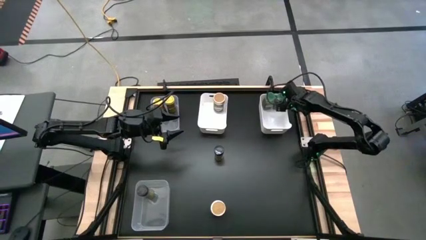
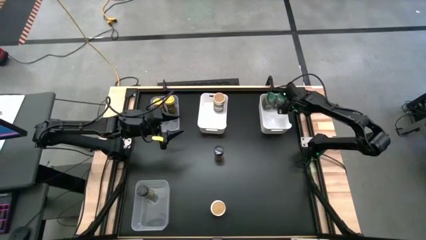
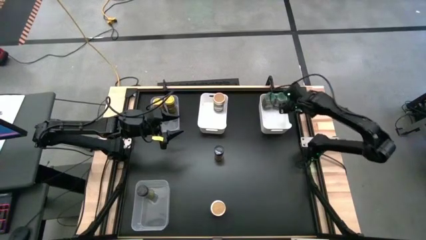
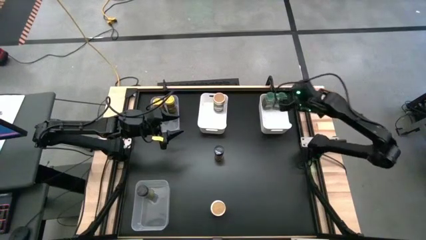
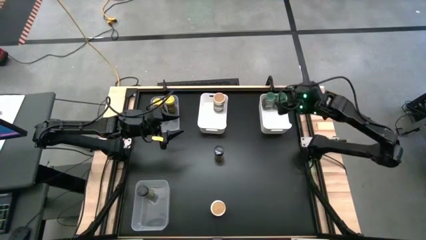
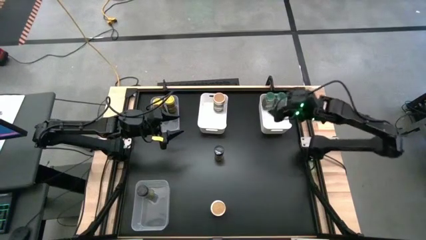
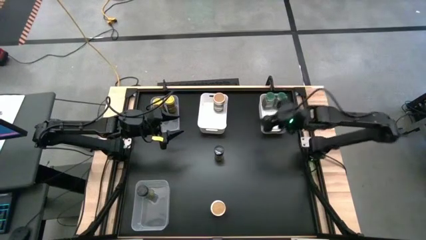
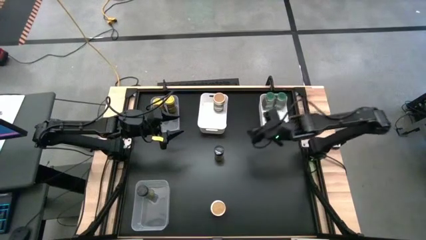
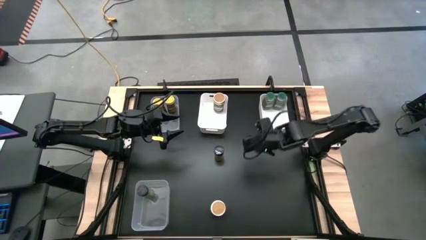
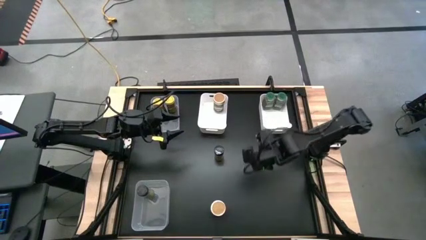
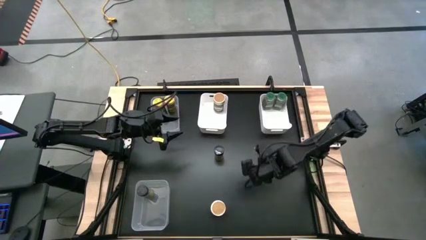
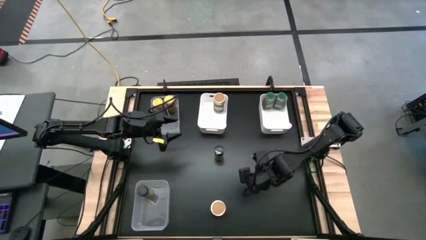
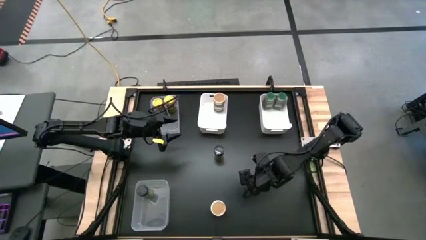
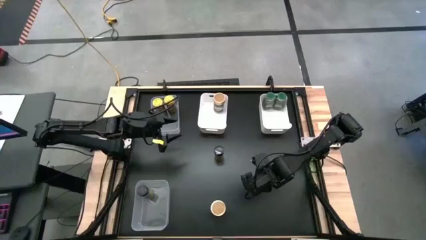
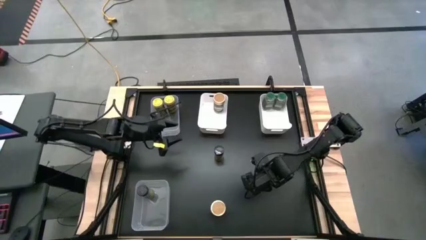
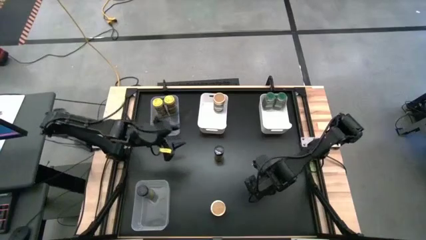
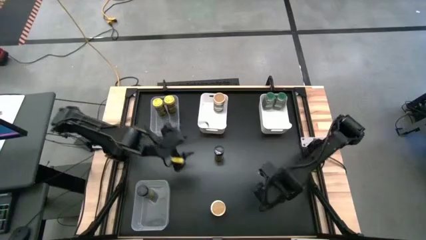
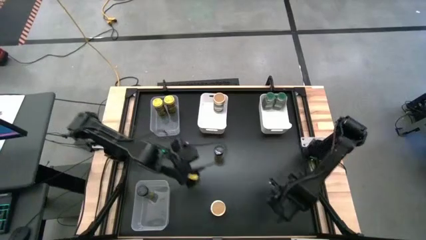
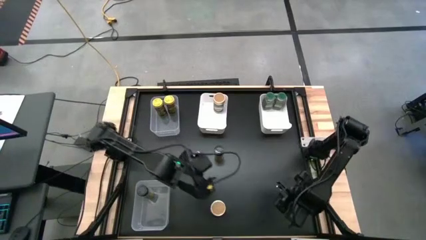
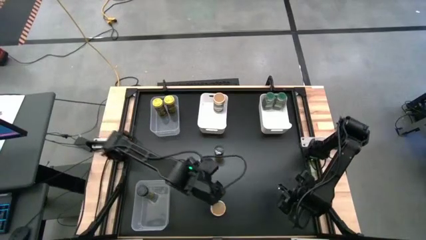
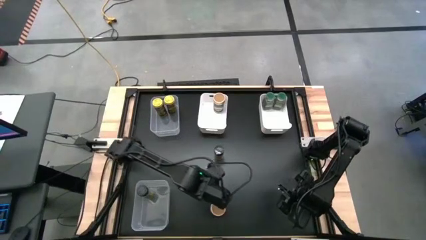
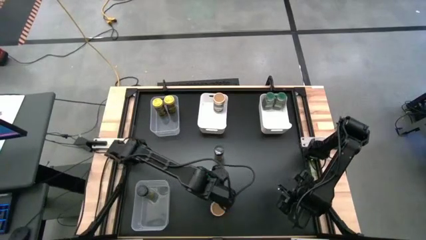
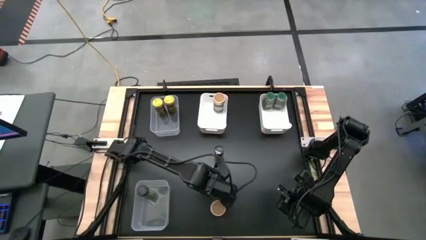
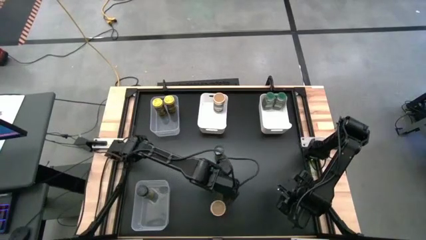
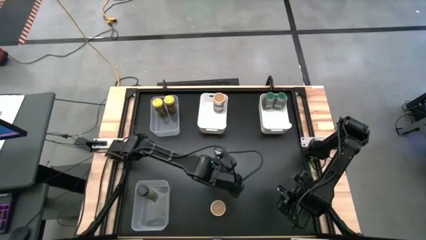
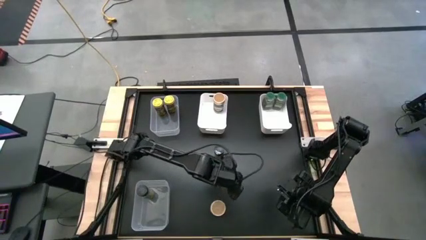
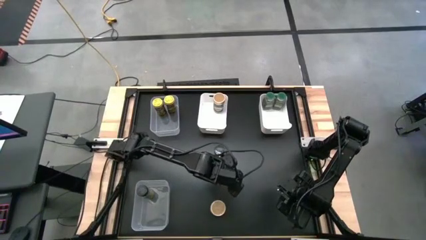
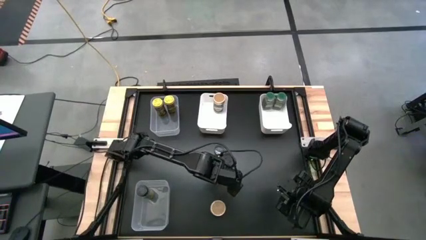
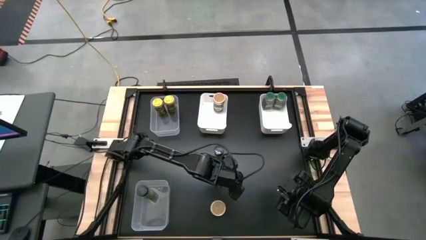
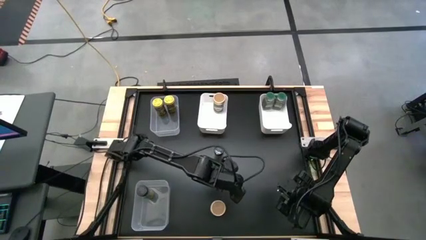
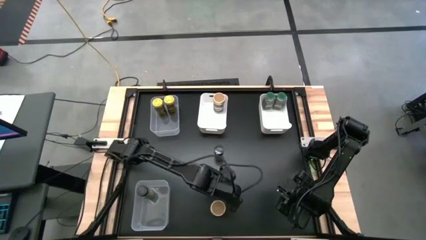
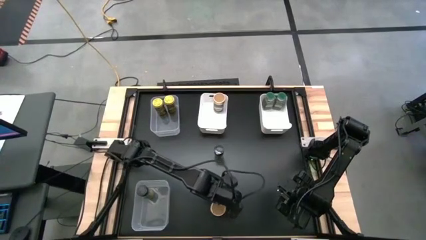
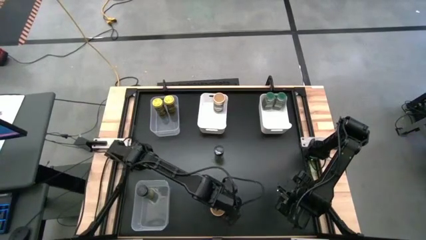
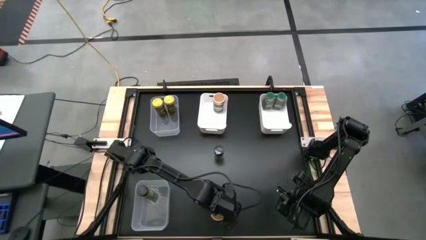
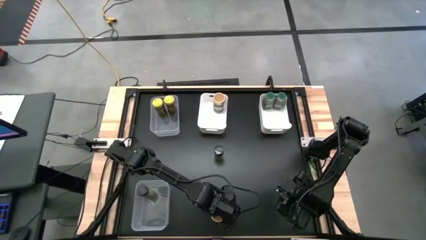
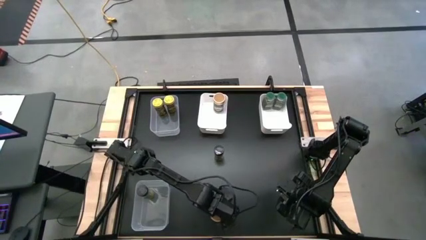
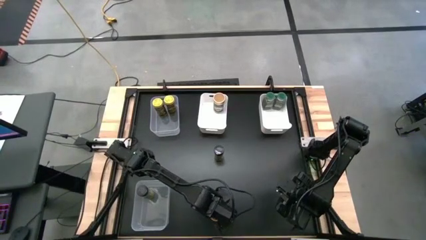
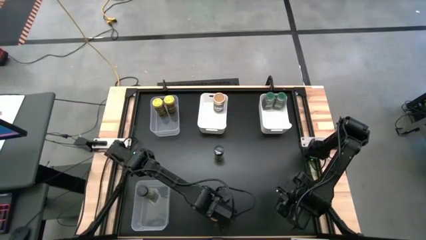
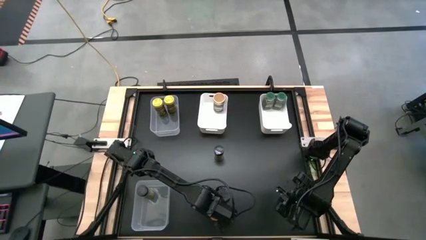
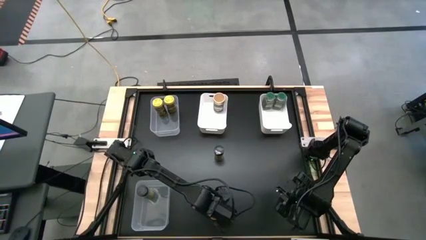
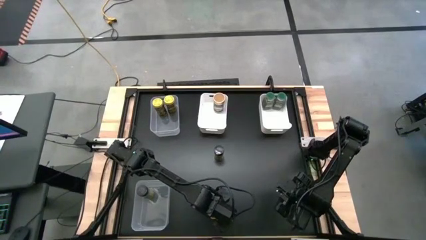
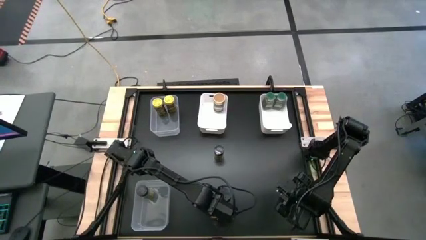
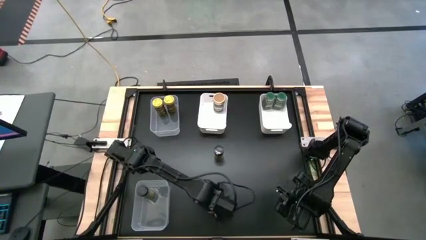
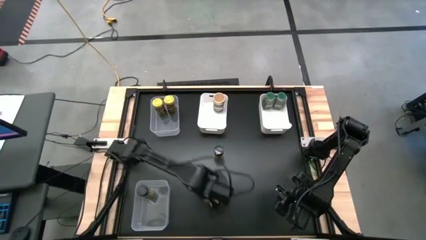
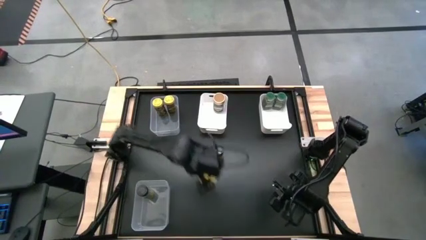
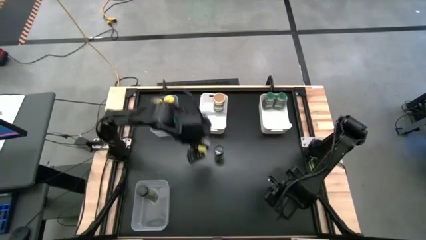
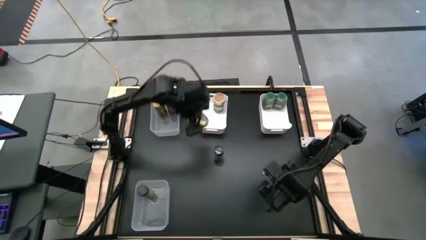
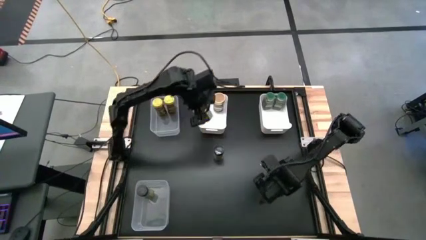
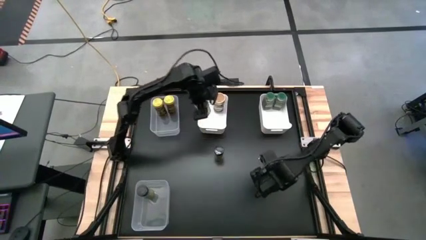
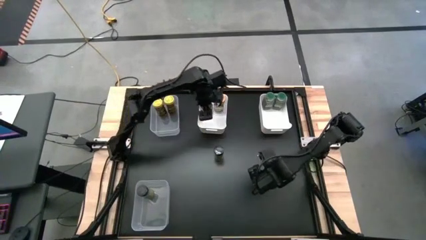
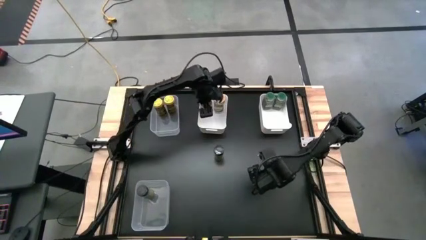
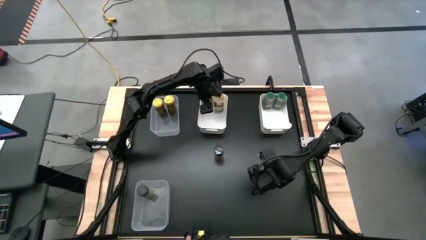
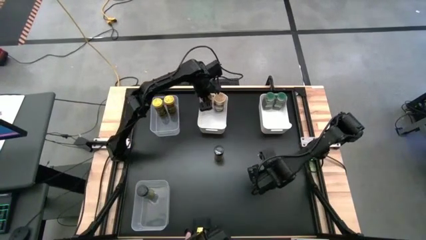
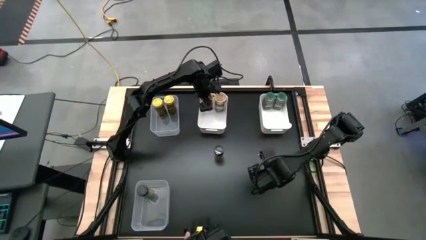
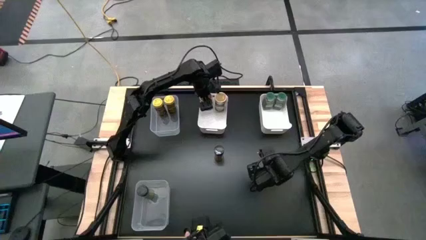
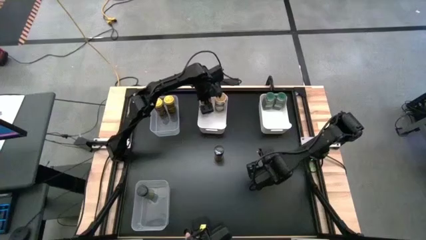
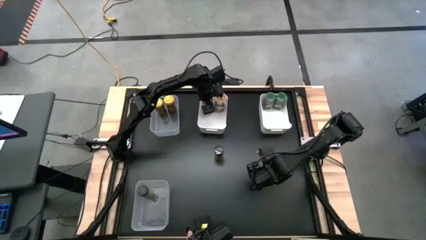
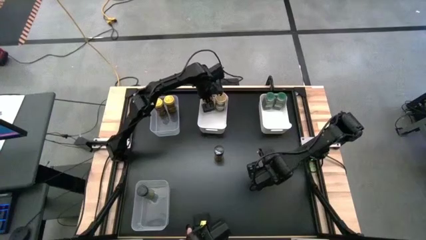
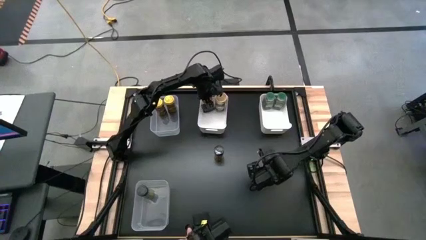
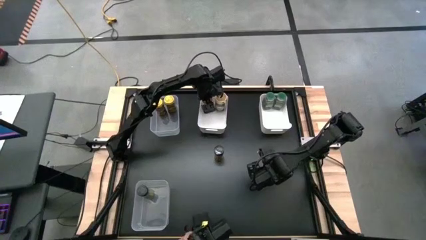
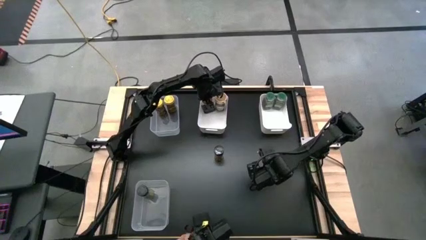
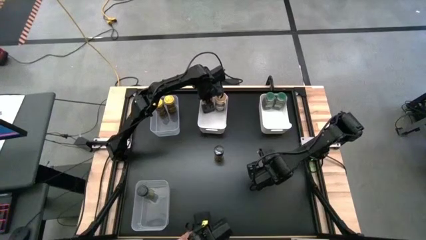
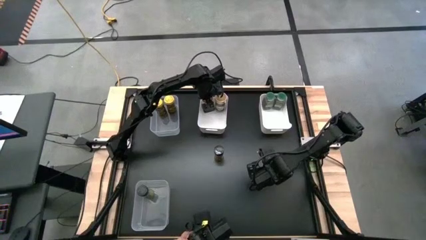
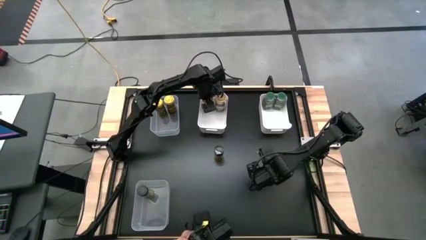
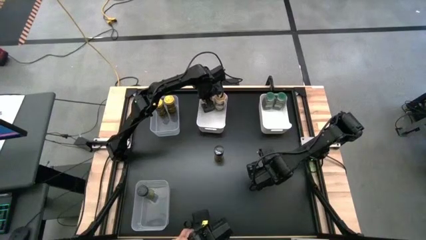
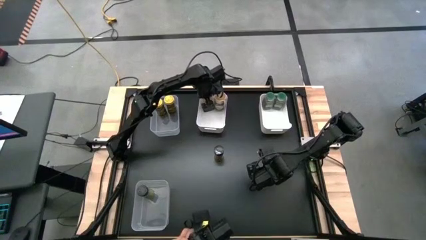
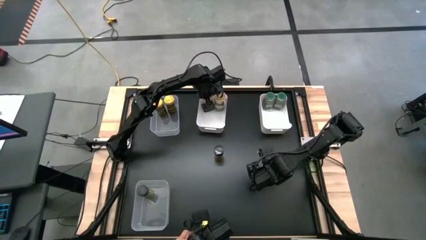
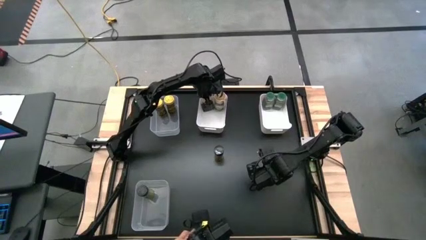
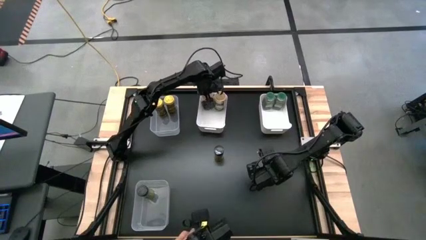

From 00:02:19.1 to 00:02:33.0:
Task: Sort spices by type
Put the gold spice bottle into the left white bin

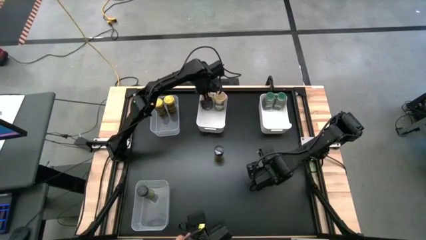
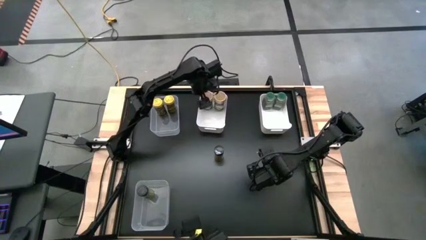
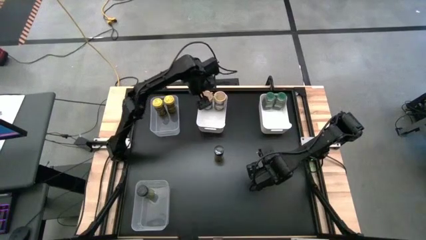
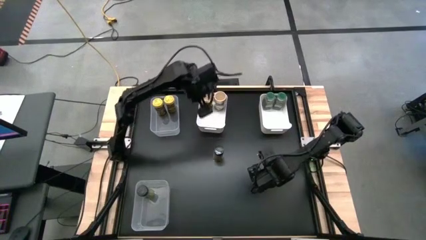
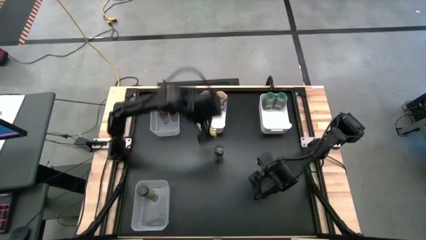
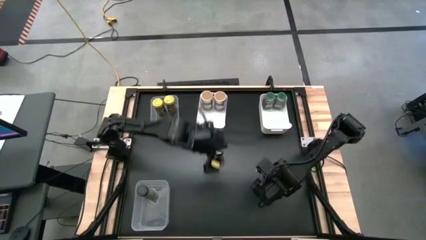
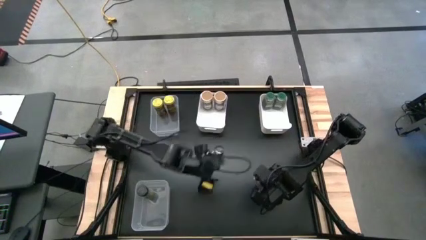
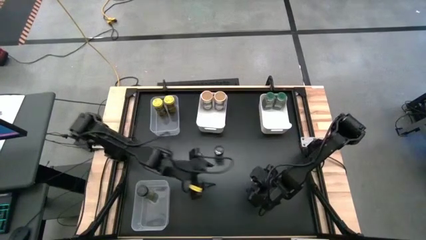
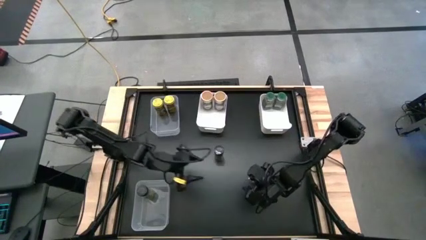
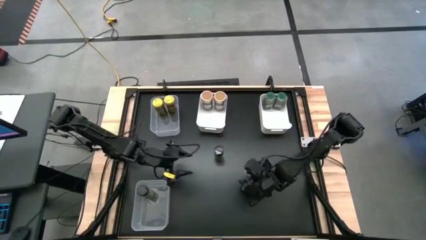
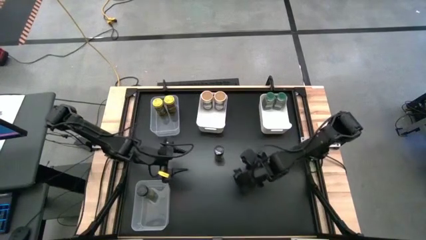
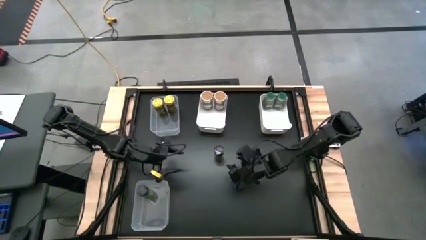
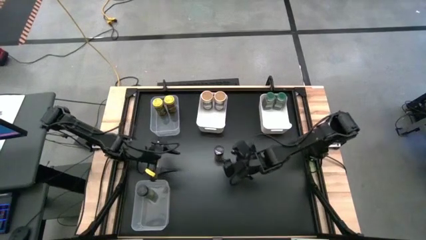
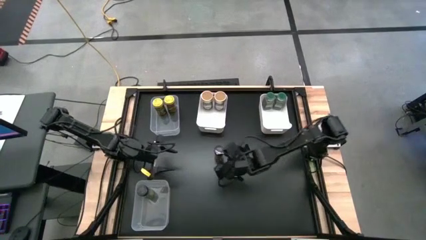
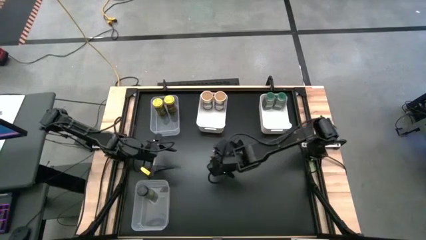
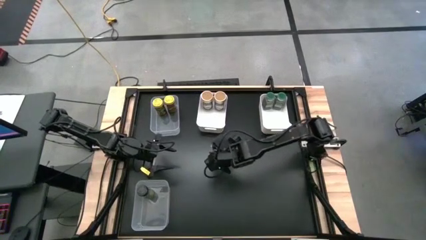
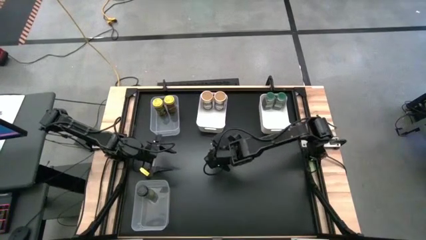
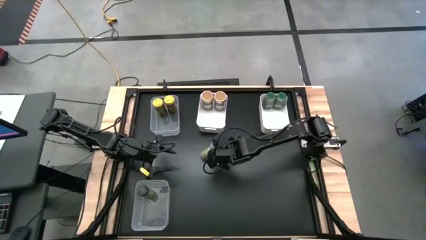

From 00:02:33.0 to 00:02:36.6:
Put the black spice bottle into the bottom transparent bin
